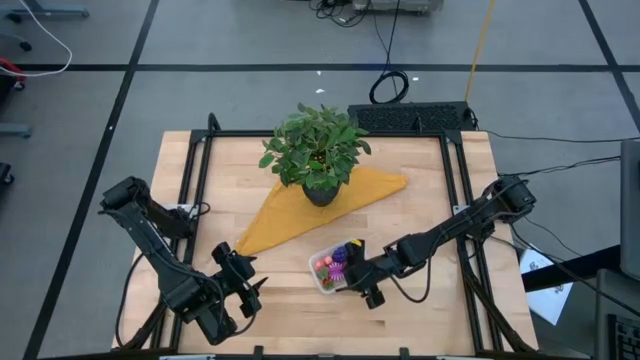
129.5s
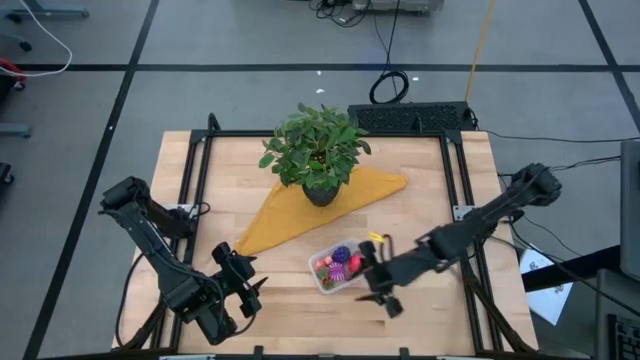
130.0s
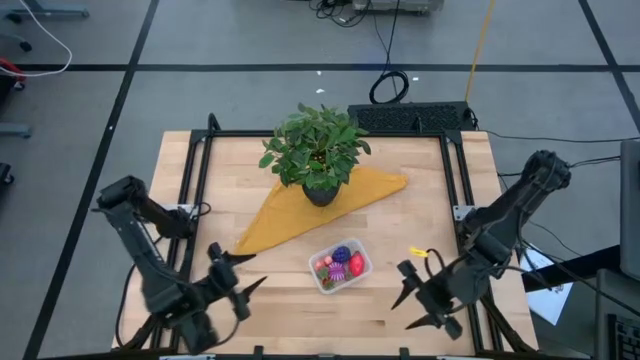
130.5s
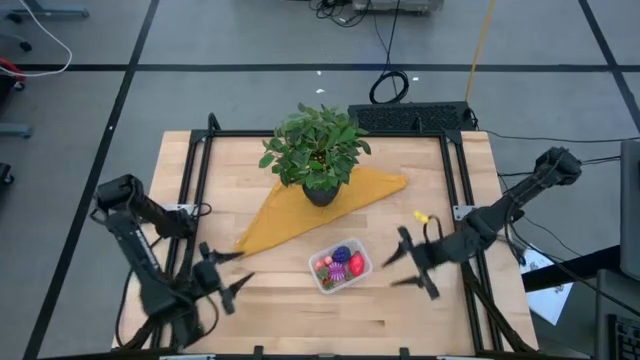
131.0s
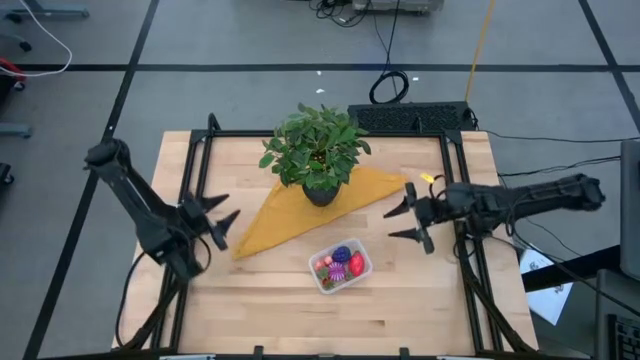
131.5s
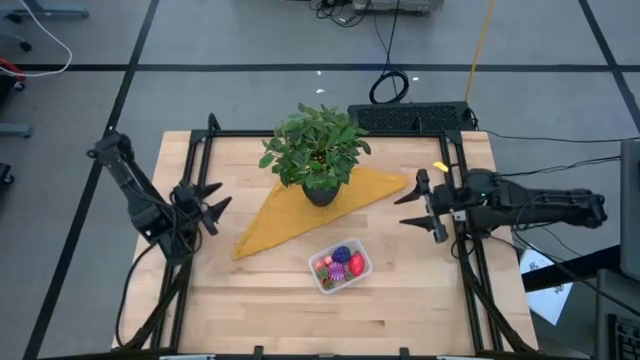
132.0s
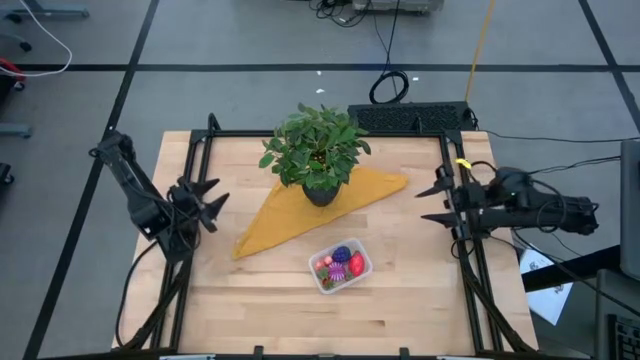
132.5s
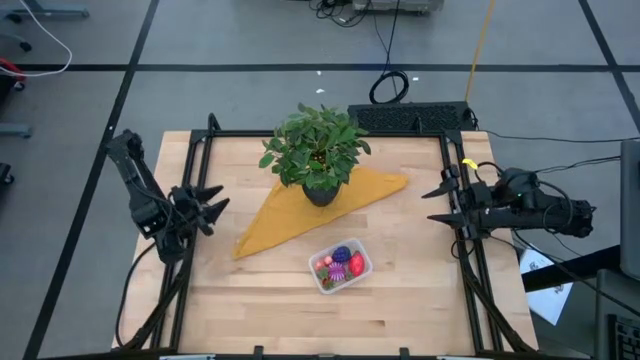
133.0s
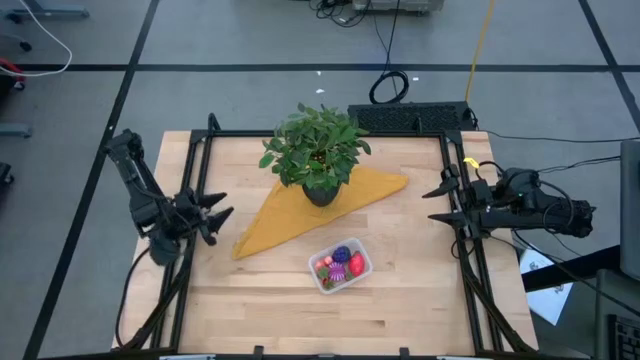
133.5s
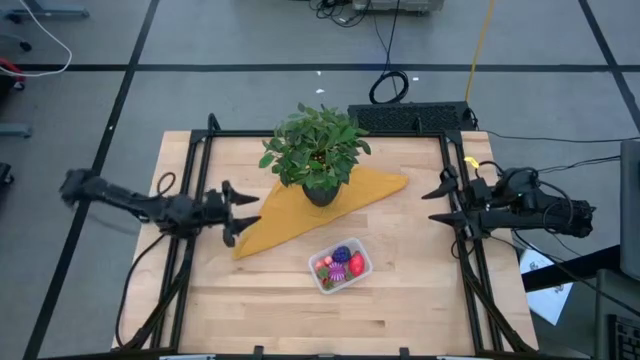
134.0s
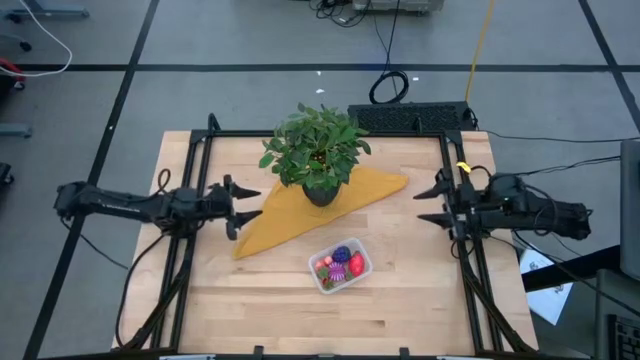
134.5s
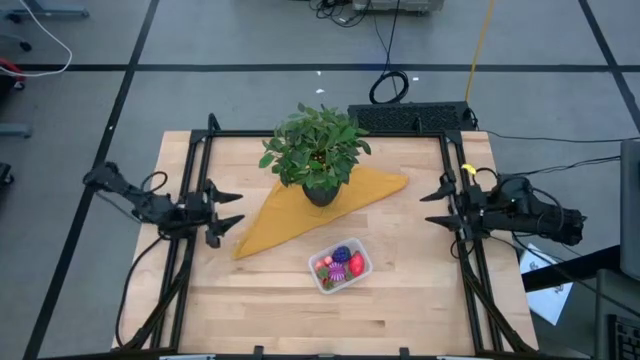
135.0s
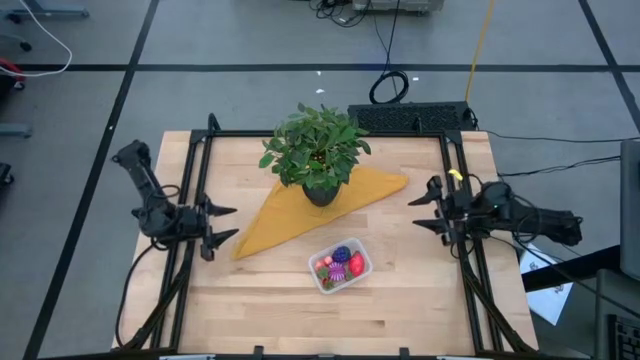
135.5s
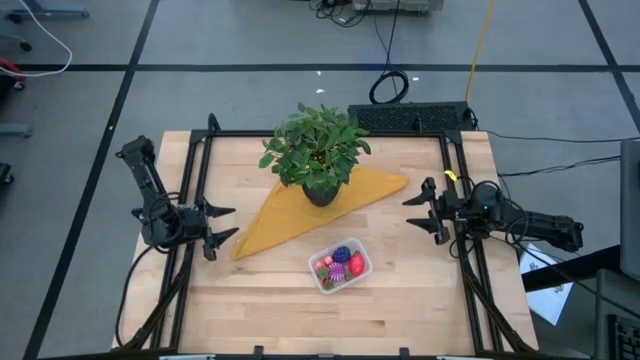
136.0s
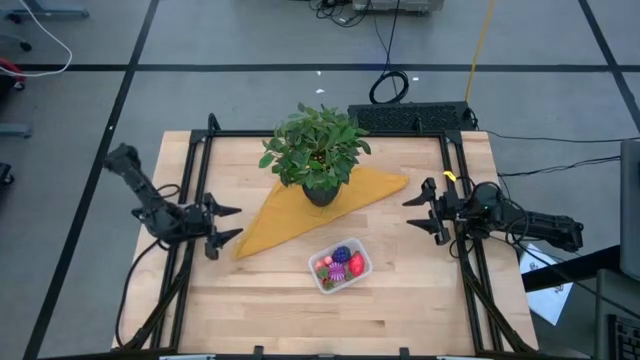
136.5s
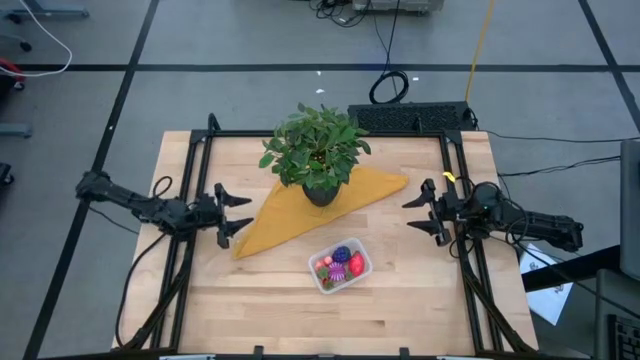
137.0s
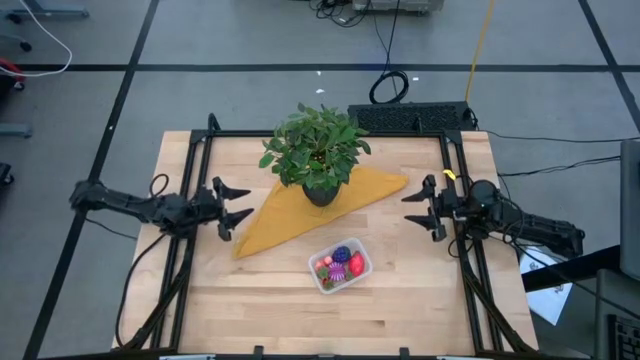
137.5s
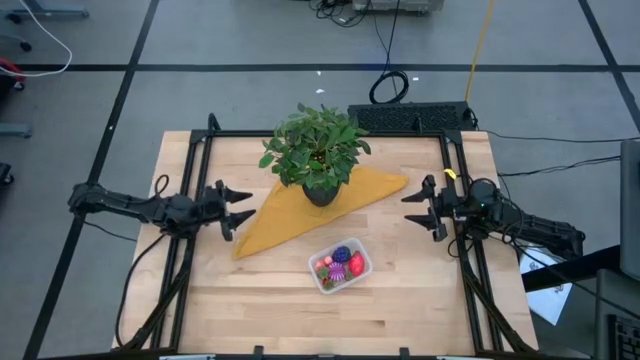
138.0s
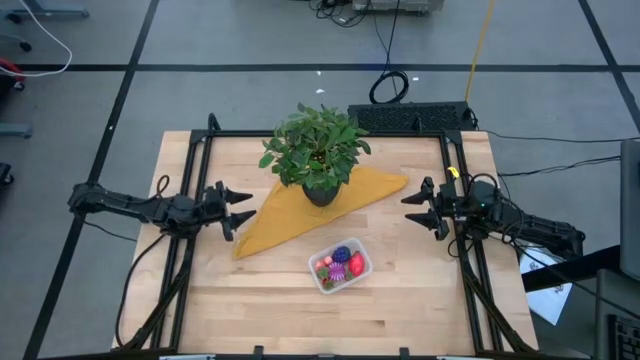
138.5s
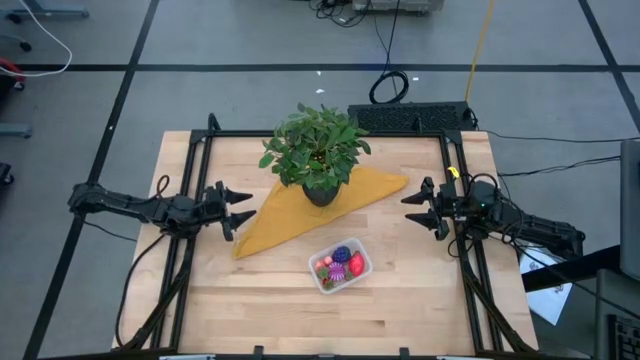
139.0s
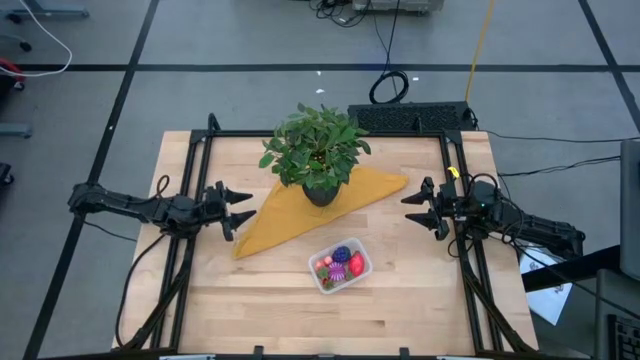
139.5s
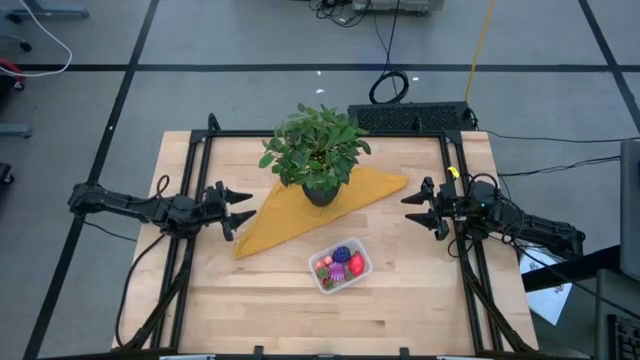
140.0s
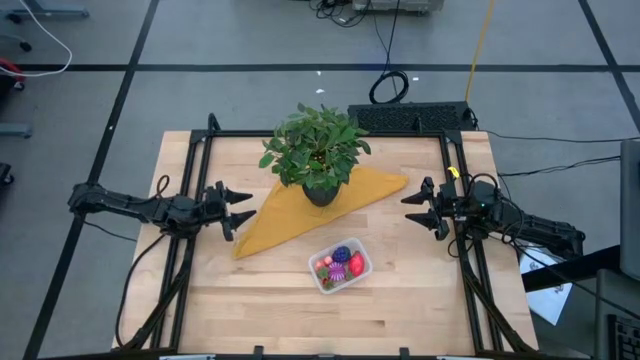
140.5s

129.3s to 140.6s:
Task: Pick and placing Produce into tupperware
Return to Home Position

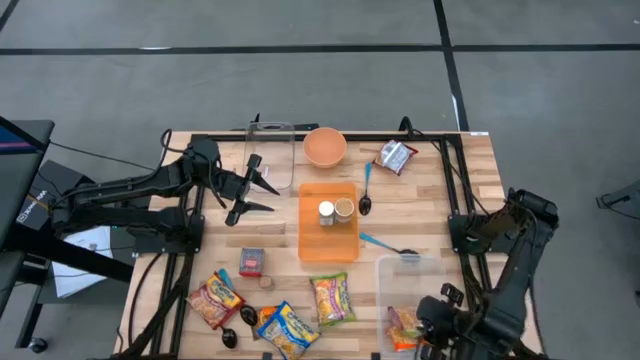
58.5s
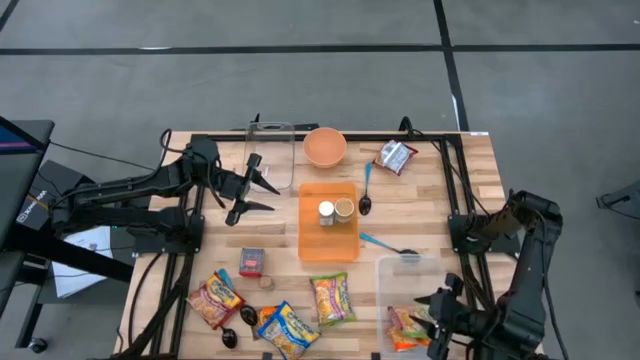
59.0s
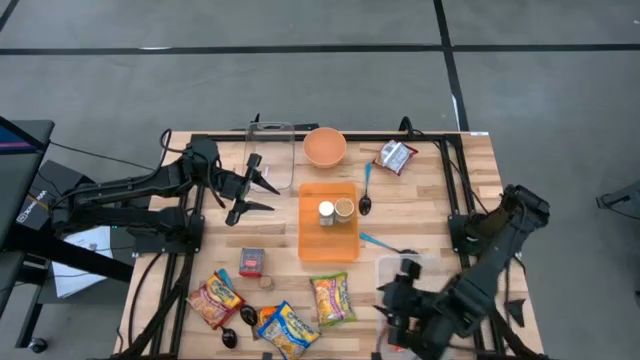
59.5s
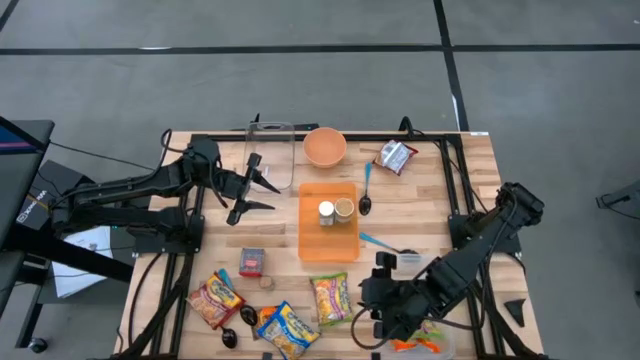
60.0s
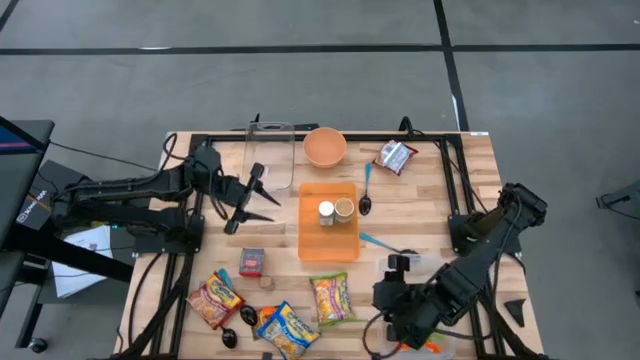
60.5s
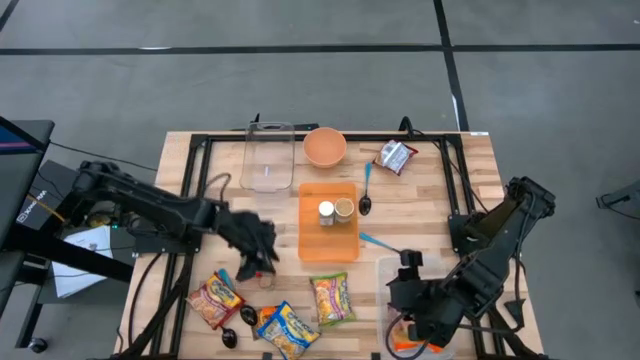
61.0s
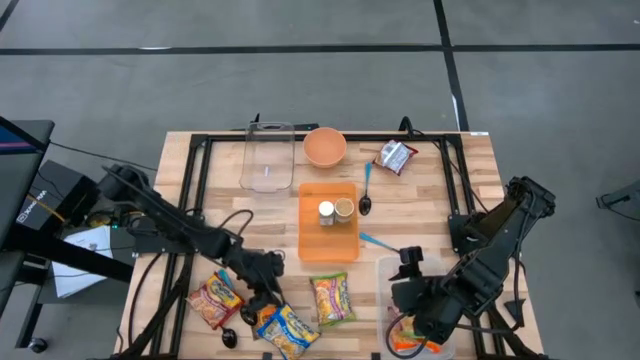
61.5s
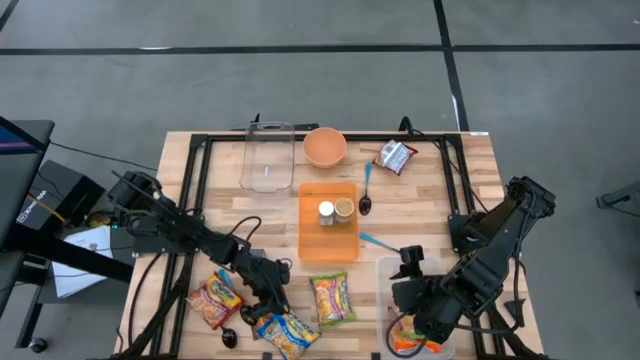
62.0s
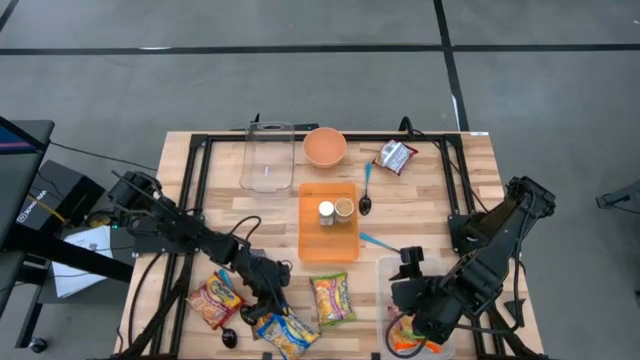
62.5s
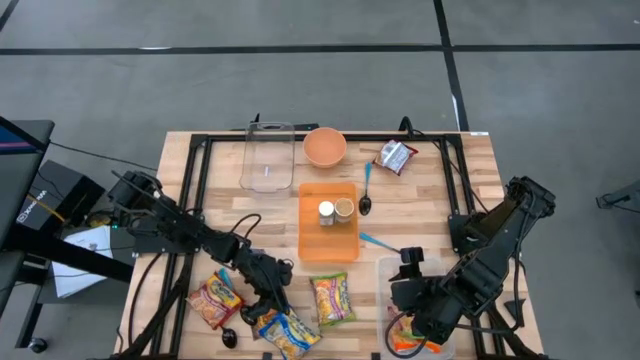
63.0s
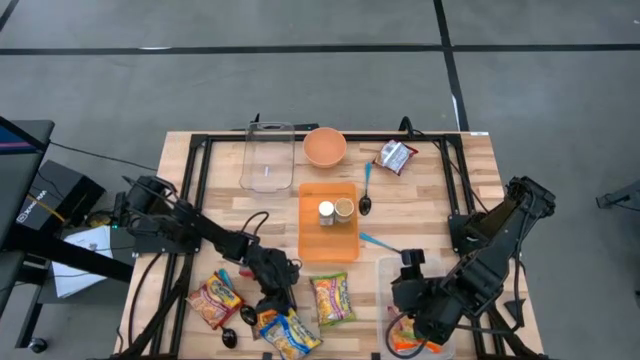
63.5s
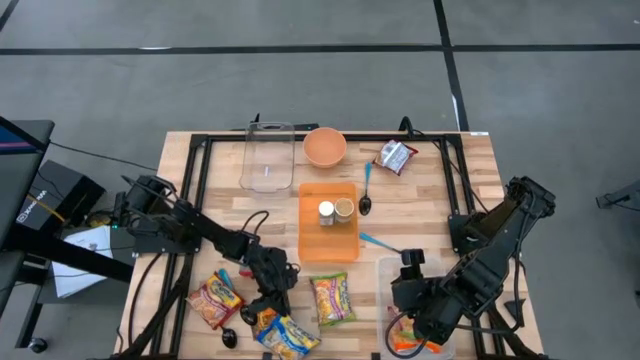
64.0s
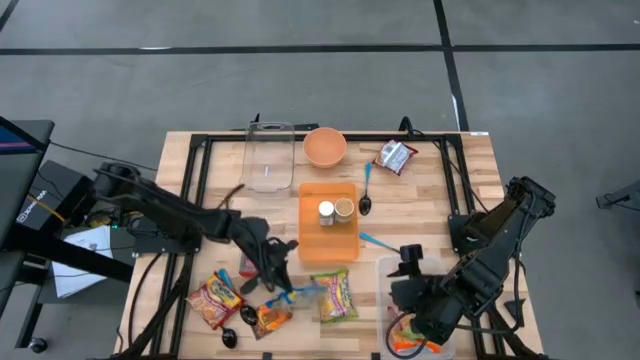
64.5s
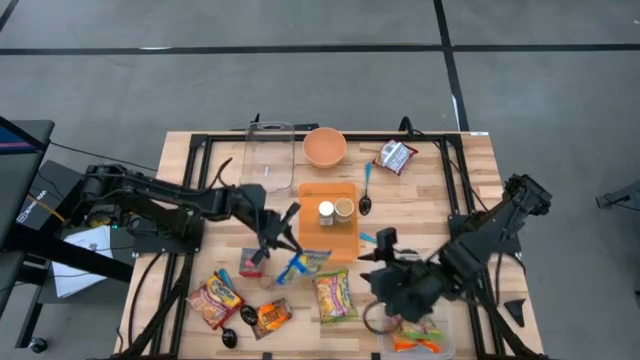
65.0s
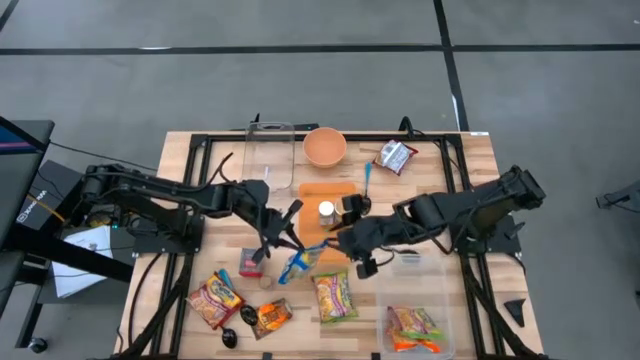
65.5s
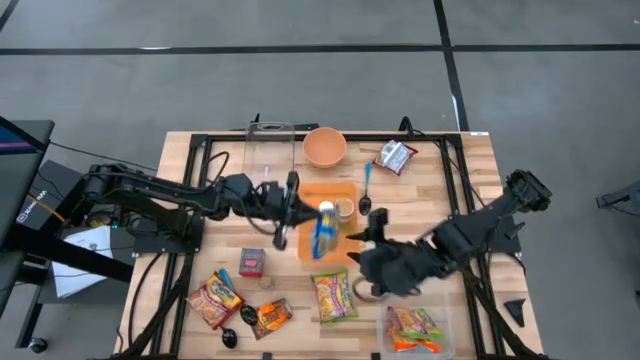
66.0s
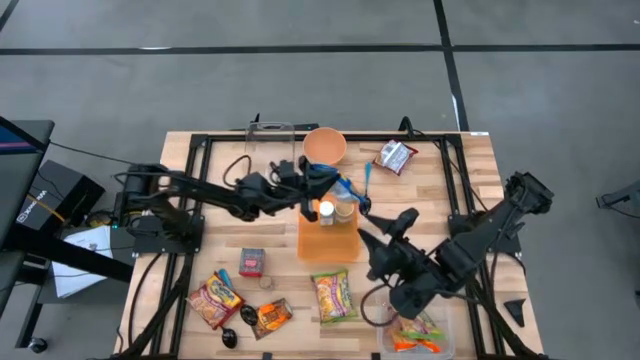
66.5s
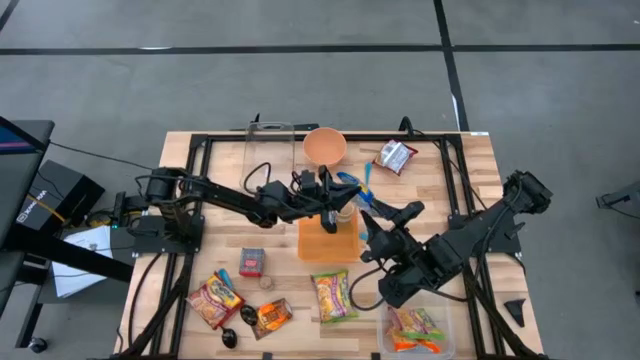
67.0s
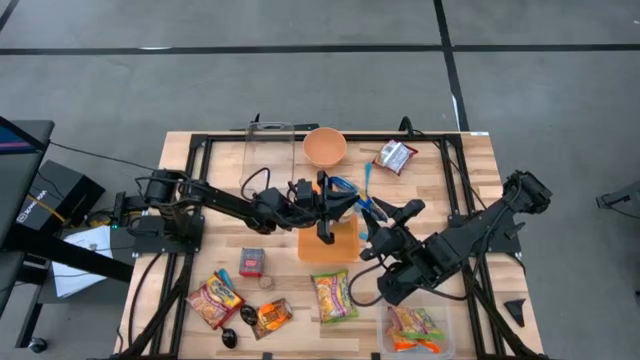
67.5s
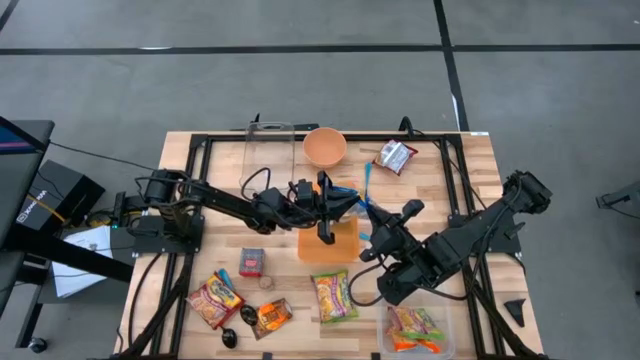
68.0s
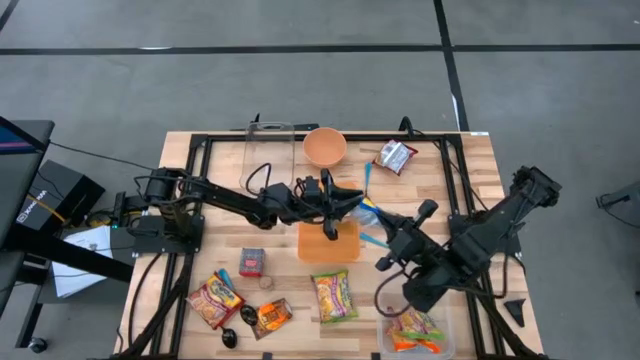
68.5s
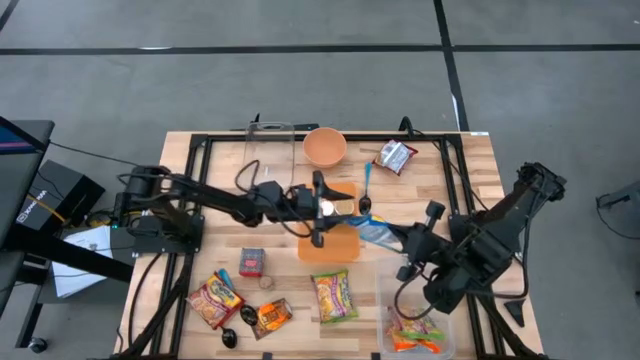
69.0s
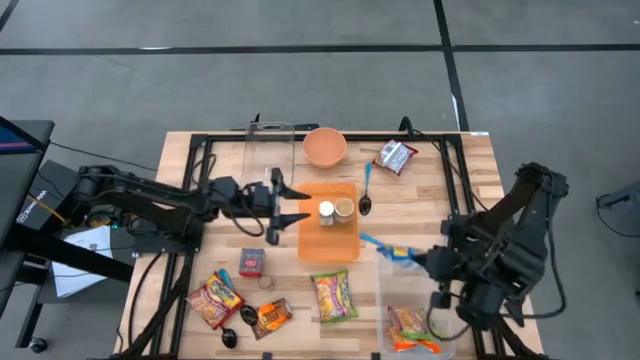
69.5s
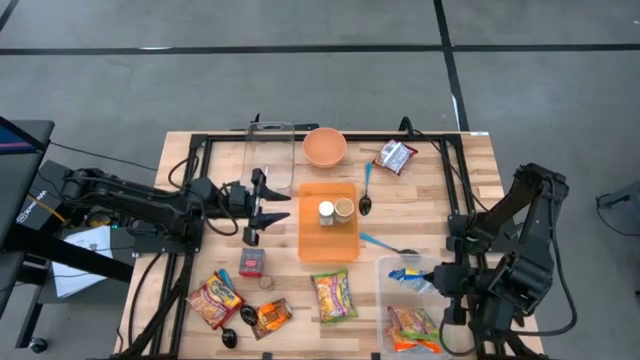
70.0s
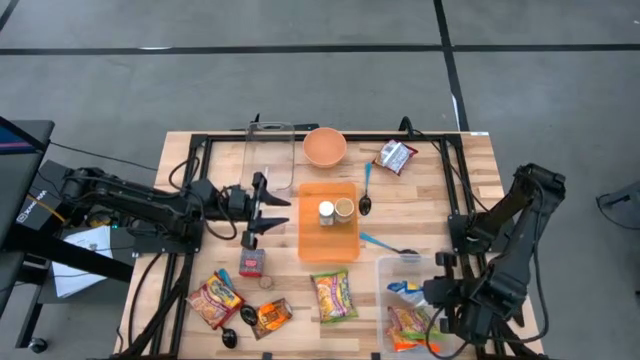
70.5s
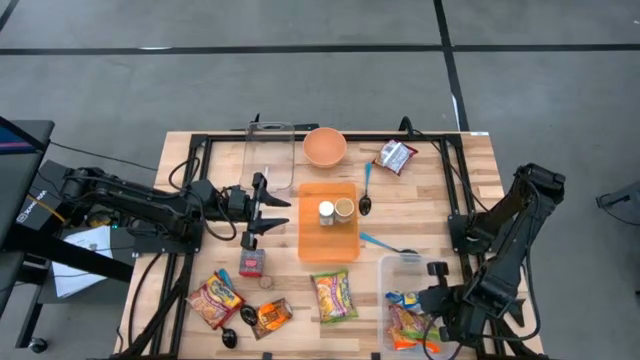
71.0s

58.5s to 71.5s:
Task: Pick & Place Food Item
Put the blue noodle pack into the transparent container
